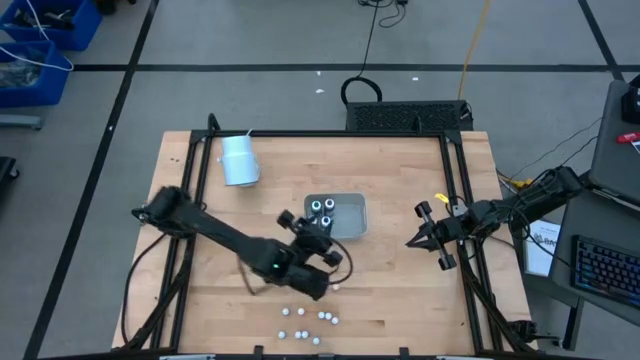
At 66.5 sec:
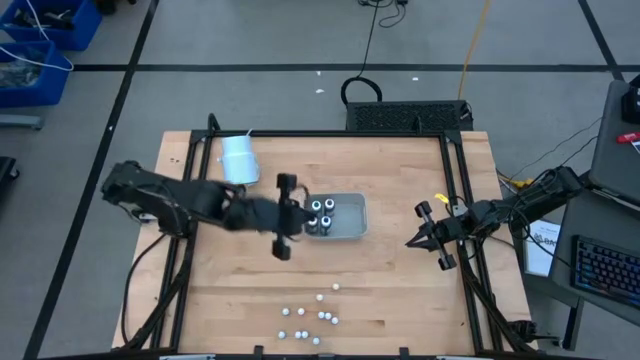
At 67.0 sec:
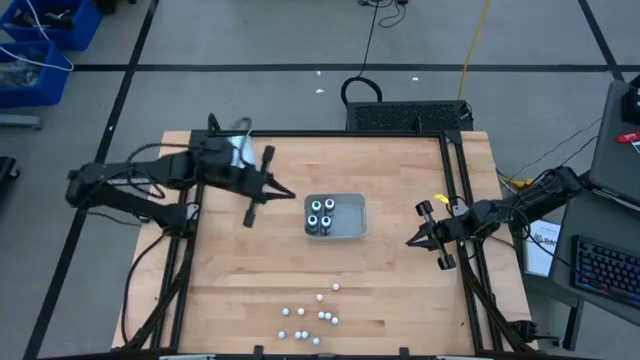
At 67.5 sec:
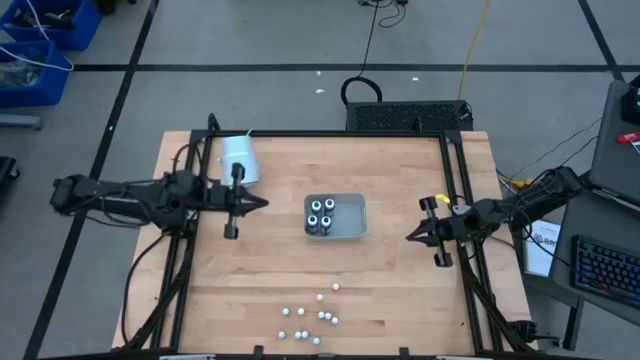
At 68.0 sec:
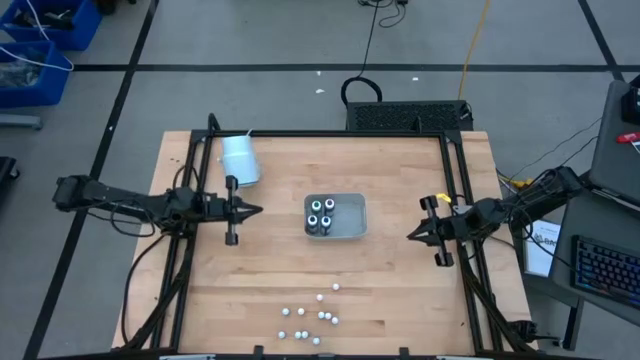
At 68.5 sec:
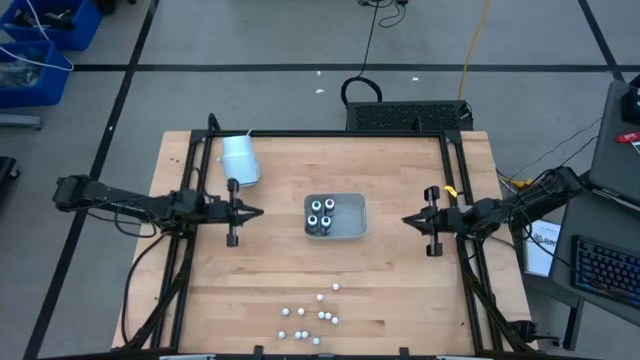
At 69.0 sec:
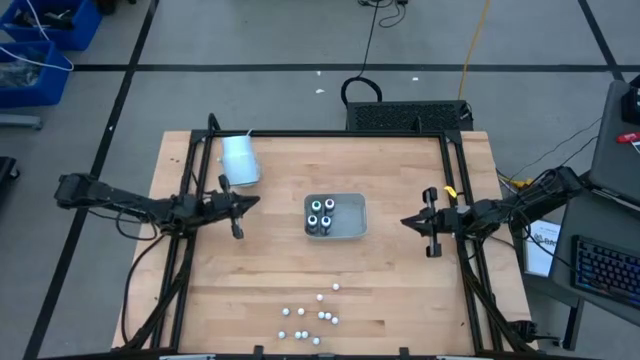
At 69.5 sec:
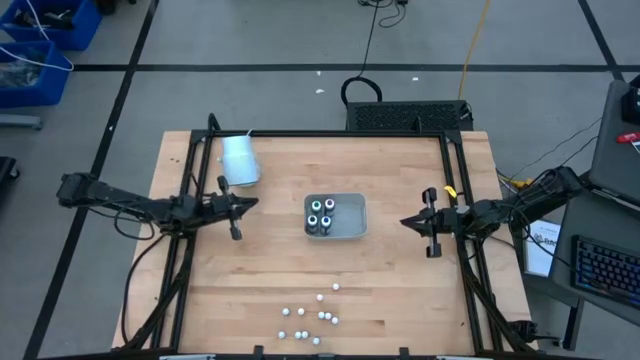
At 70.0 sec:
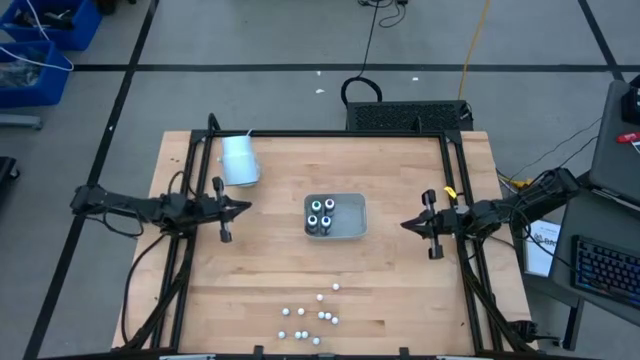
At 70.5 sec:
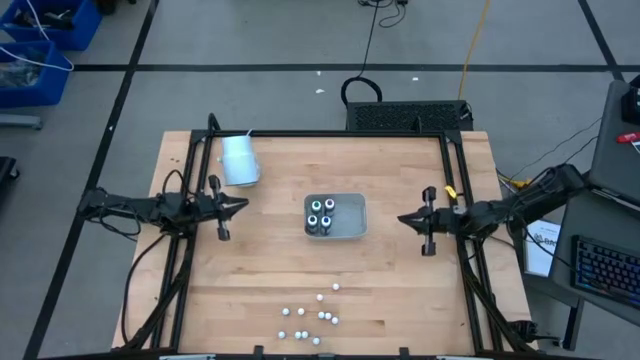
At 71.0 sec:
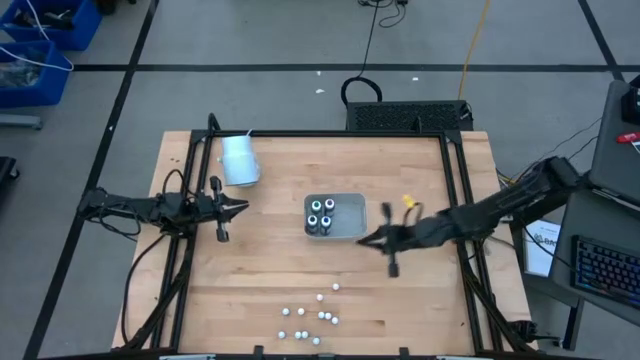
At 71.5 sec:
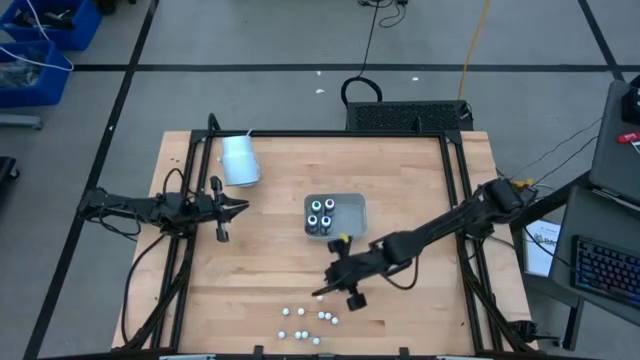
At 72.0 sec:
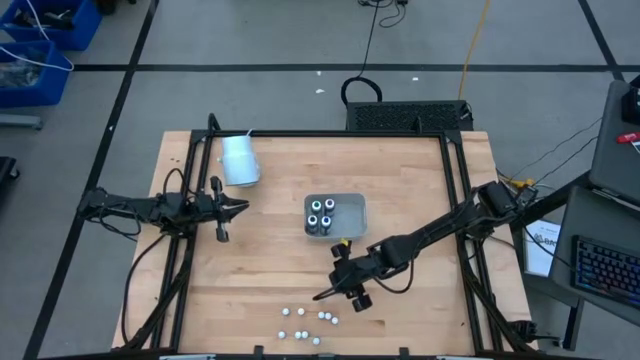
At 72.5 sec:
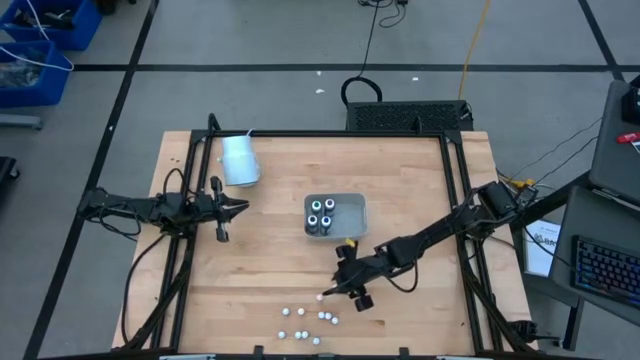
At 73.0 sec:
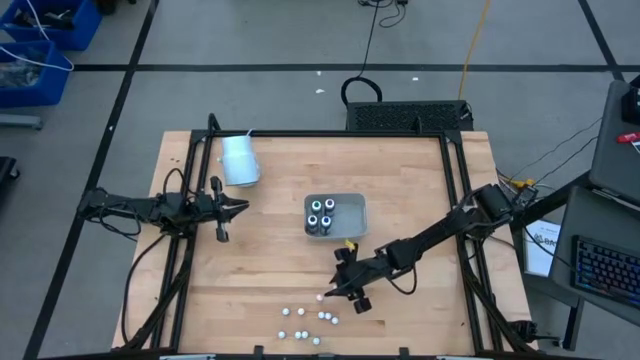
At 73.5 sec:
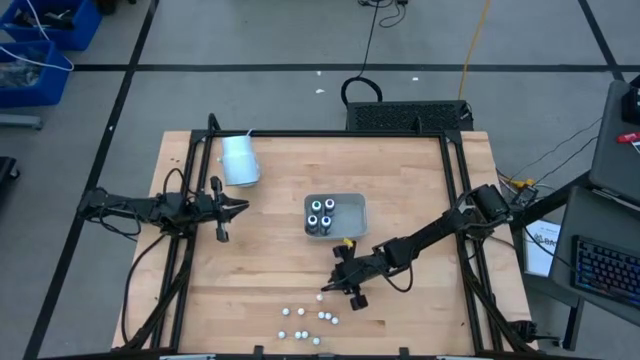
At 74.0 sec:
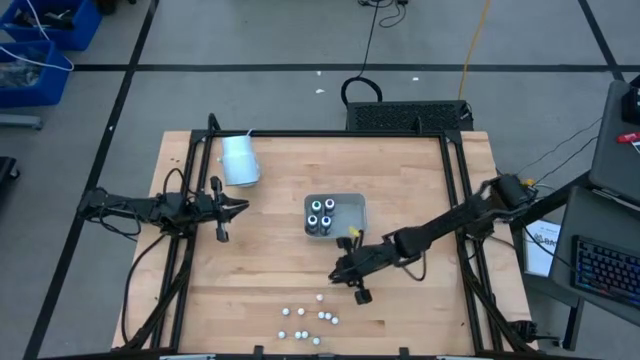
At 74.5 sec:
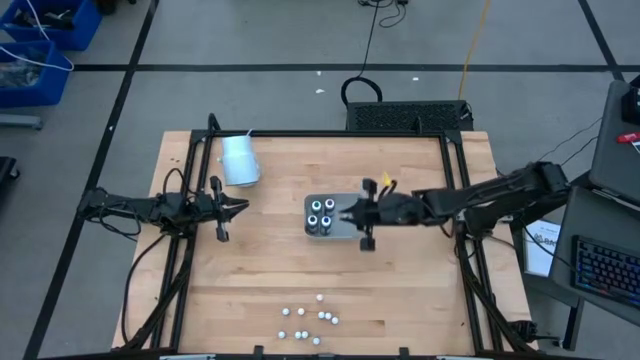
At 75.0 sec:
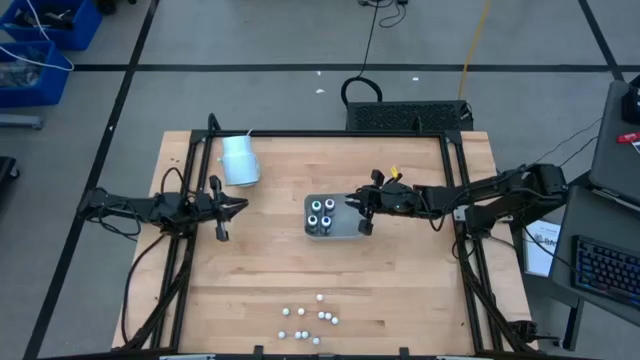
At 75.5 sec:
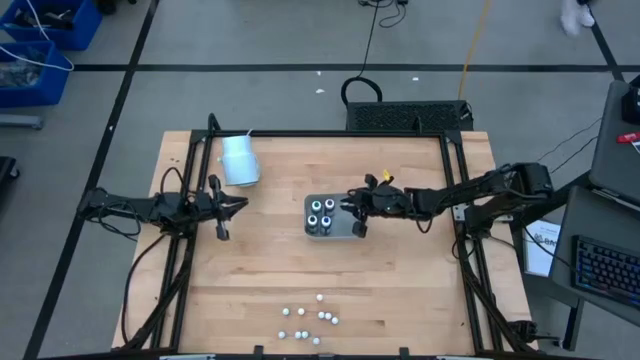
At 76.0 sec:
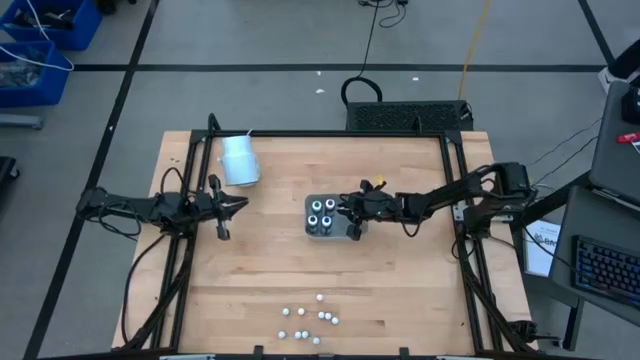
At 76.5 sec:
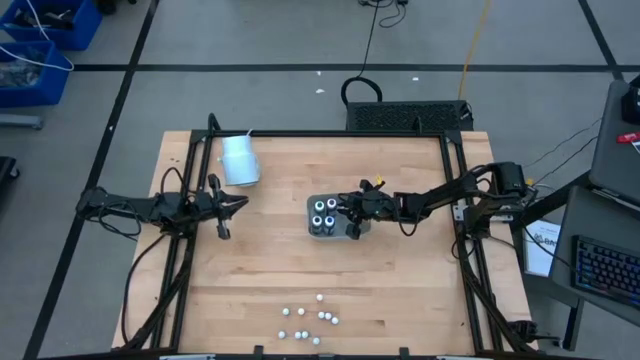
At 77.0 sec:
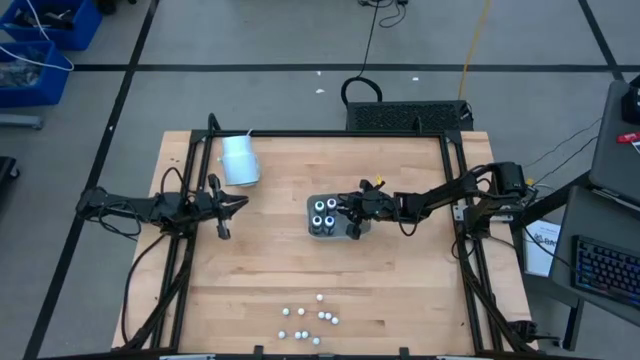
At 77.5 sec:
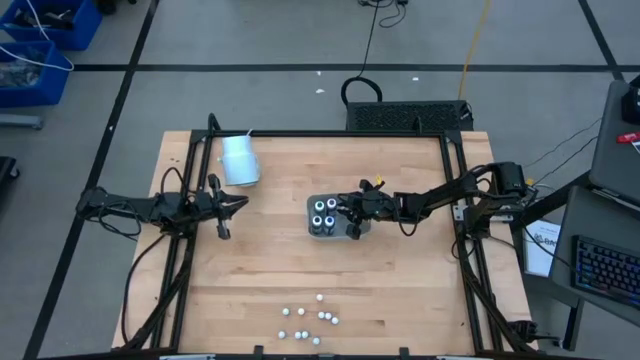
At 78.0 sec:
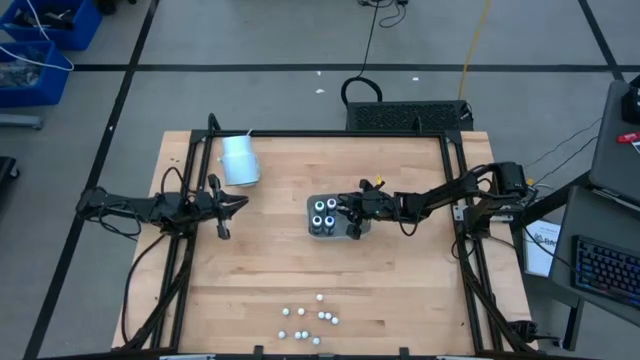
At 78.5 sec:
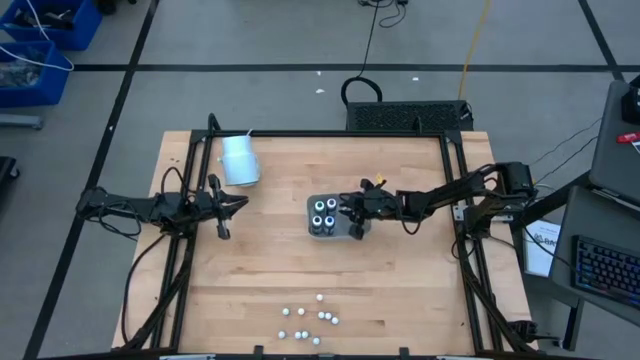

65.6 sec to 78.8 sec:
Task: Pick & Place food coloring
Put the orange food coloring bottle into the bin

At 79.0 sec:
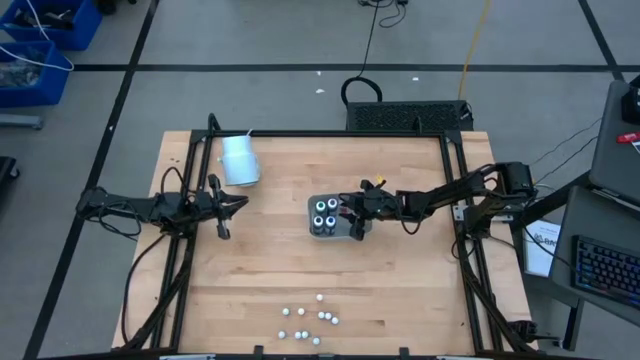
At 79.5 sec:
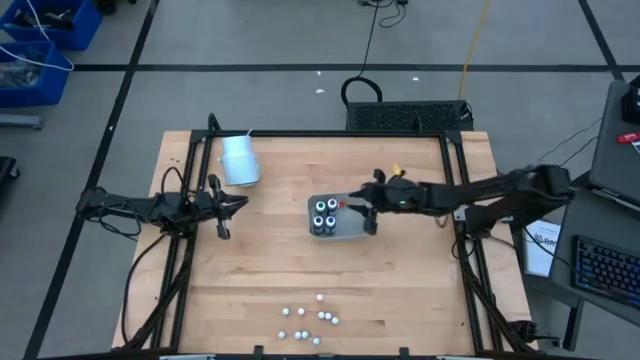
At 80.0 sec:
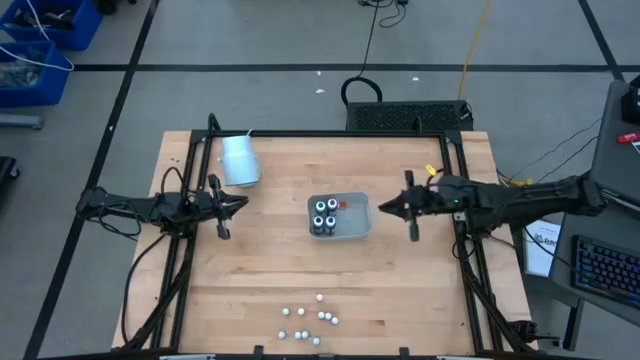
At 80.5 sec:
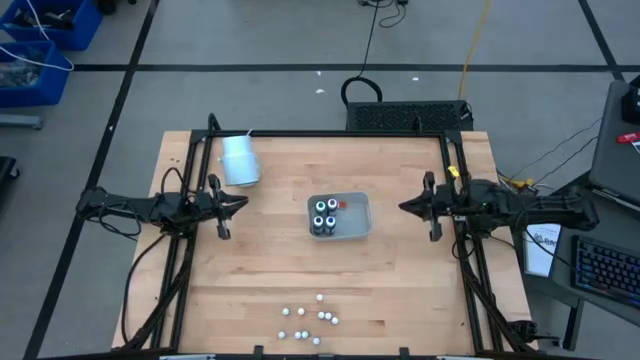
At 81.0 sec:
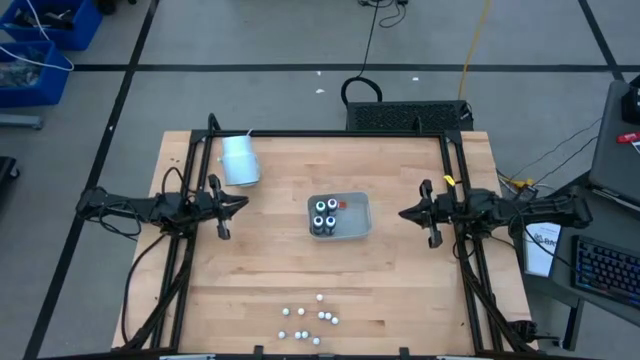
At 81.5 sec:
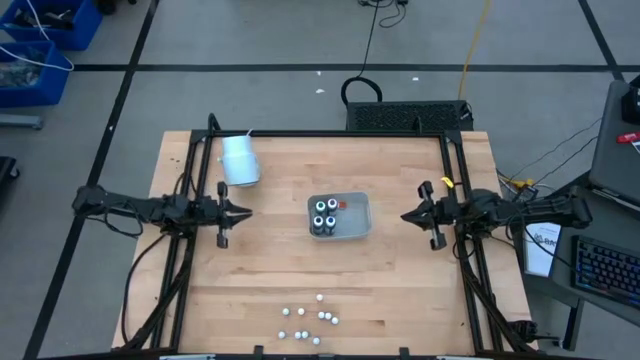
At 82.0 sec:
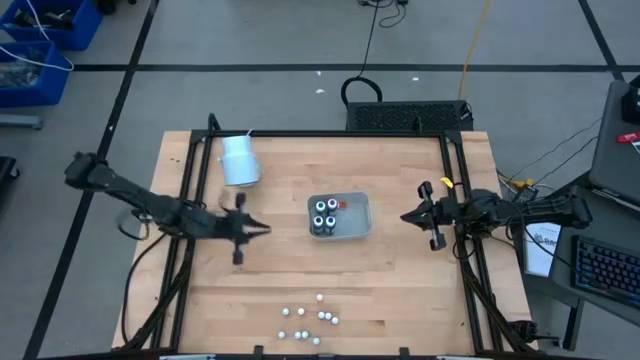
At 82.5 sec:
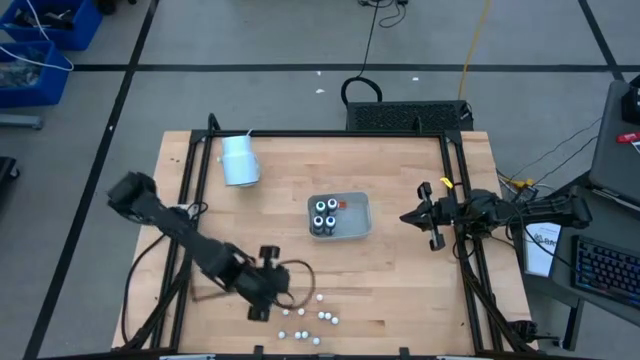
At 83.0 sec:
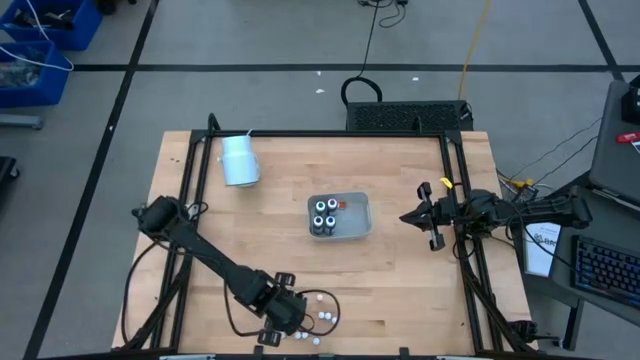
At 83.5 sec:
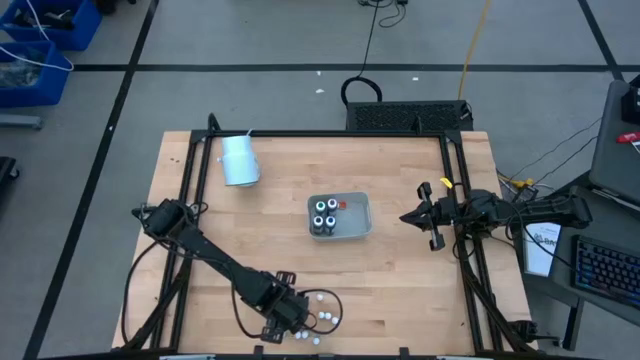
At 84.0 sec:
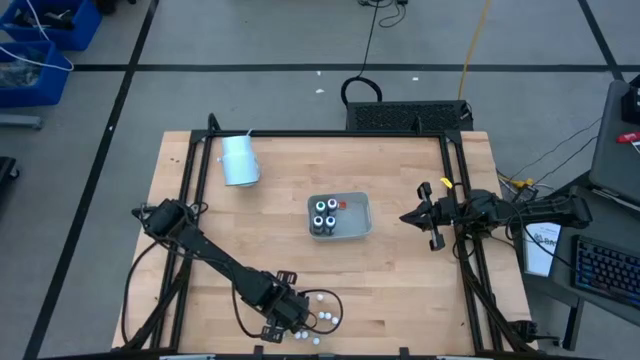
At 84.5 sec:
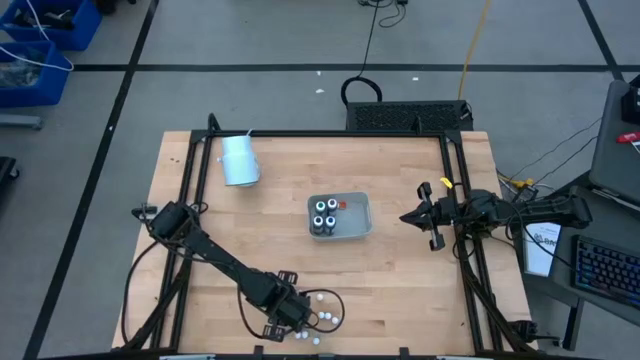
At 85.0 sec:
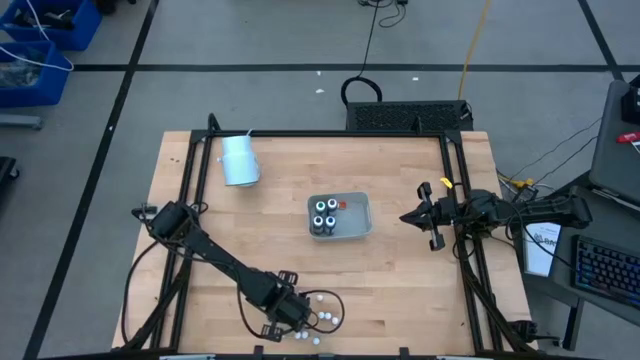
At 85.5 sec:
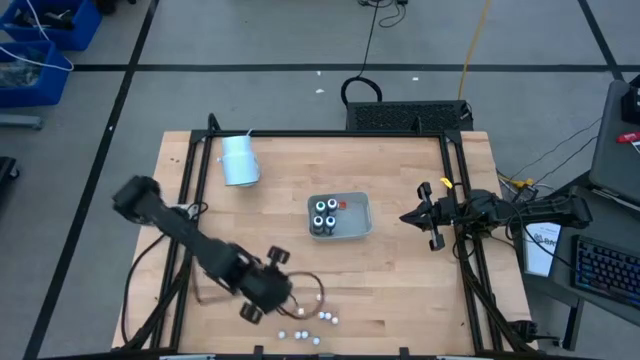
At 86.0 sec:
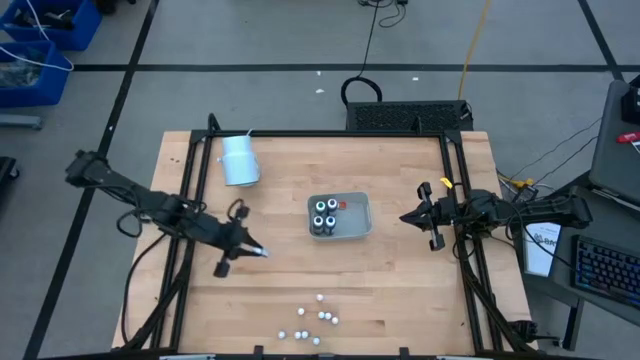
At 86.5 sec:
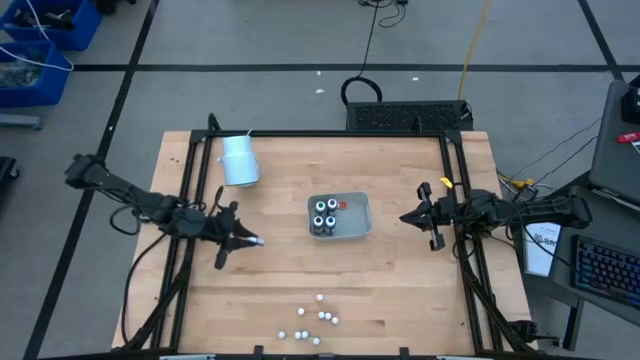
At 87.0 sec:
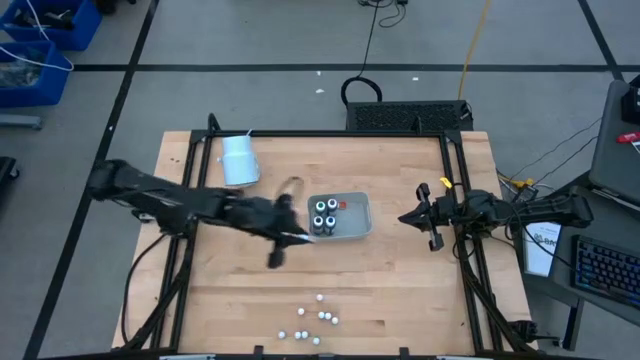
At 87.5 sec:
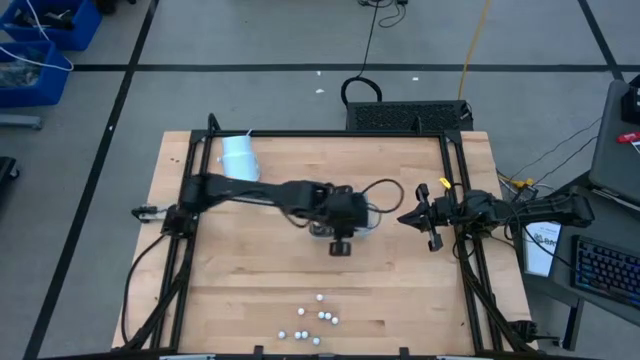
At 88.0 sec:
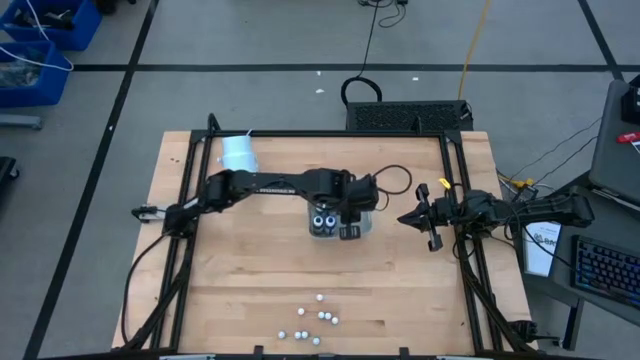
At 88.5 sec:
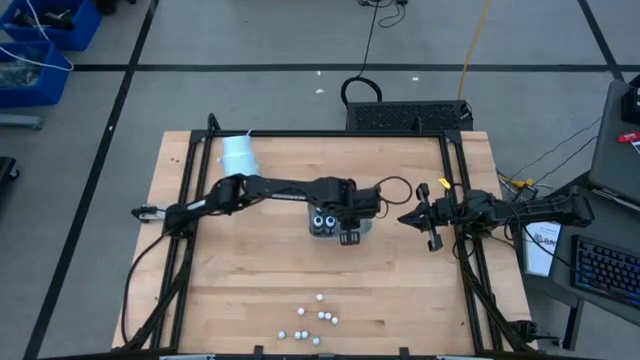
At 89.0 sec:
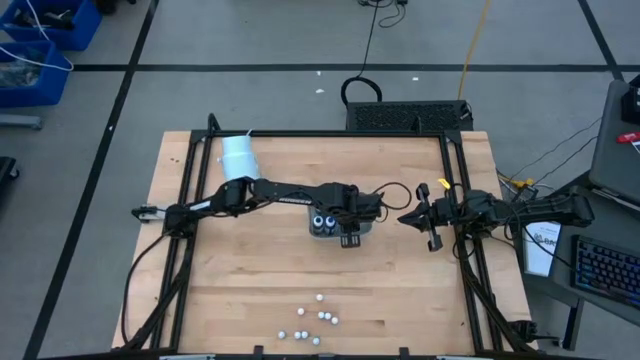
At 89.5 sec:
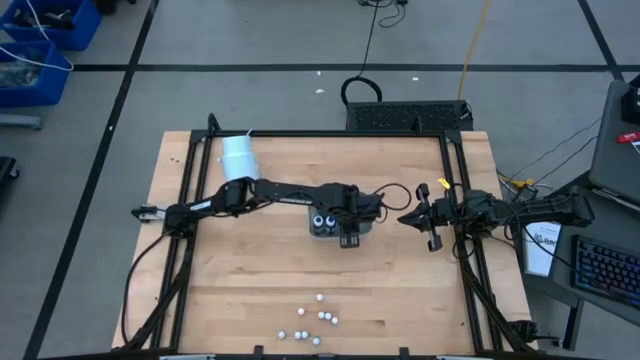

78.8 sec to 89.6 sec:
Put the top small black food coloring bottle into the bin
